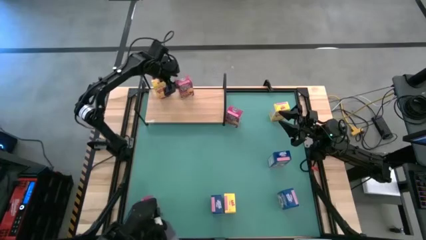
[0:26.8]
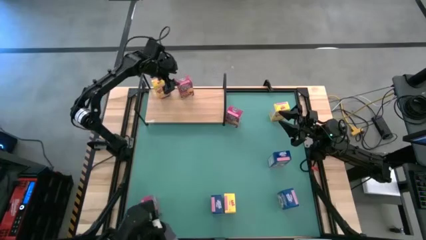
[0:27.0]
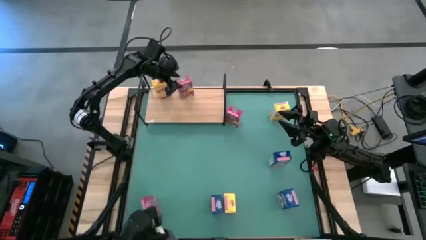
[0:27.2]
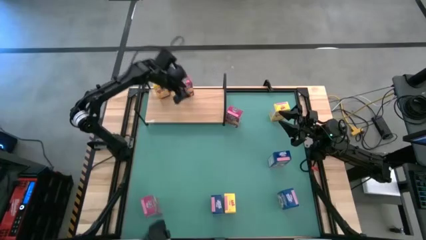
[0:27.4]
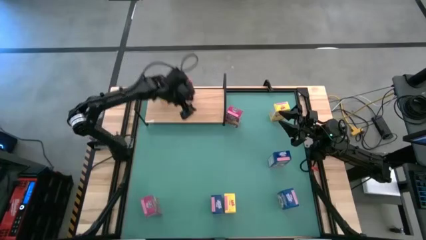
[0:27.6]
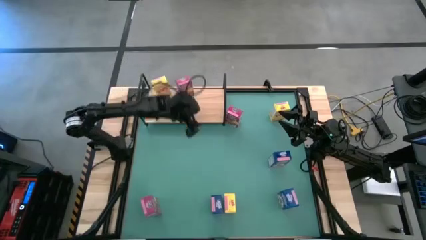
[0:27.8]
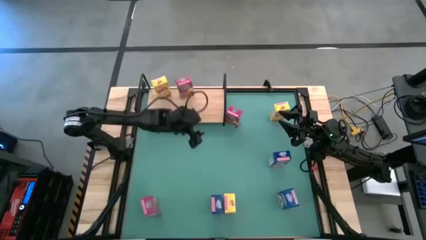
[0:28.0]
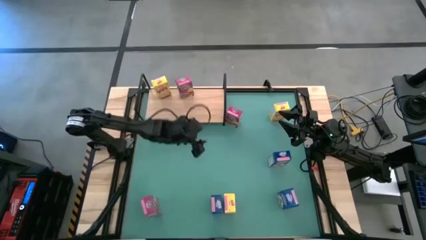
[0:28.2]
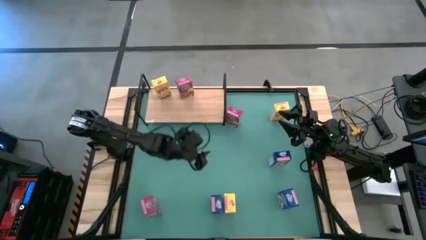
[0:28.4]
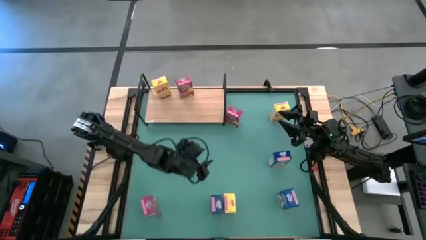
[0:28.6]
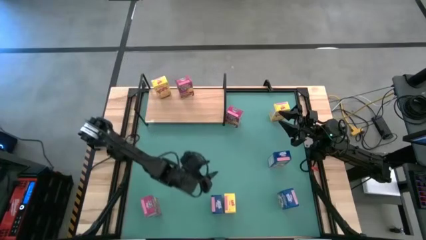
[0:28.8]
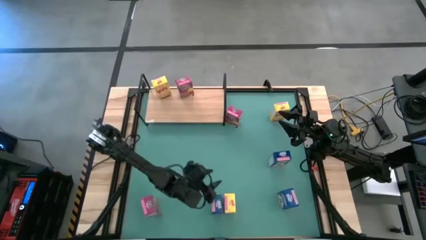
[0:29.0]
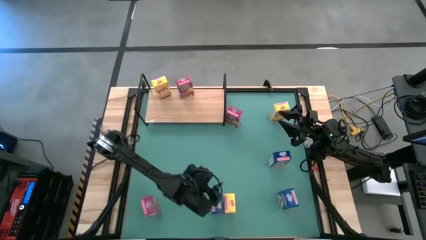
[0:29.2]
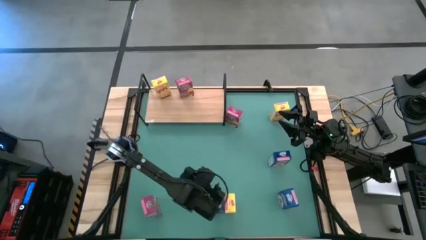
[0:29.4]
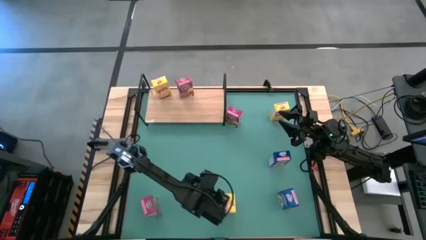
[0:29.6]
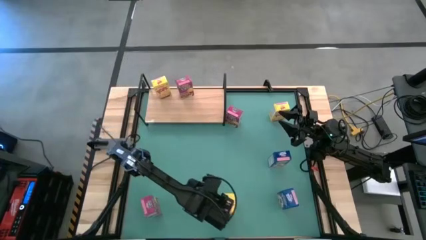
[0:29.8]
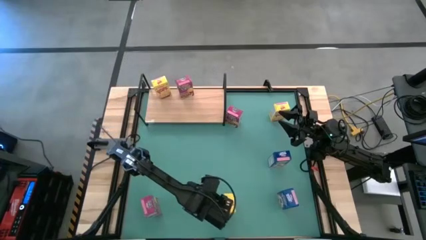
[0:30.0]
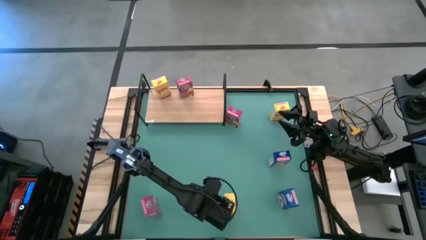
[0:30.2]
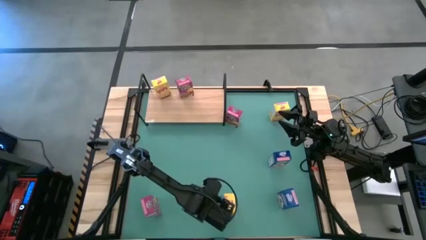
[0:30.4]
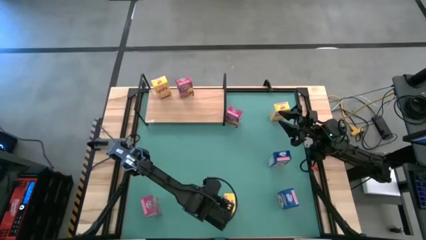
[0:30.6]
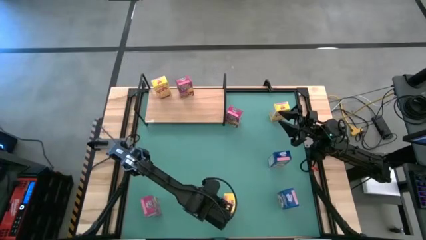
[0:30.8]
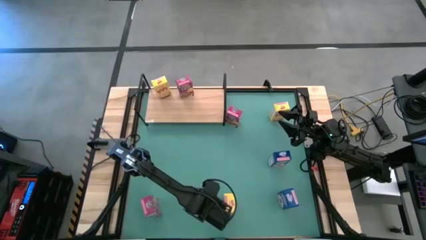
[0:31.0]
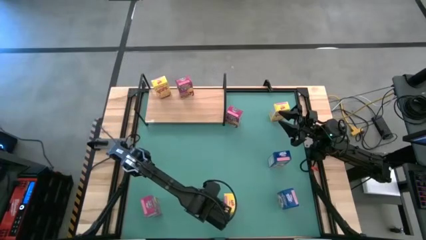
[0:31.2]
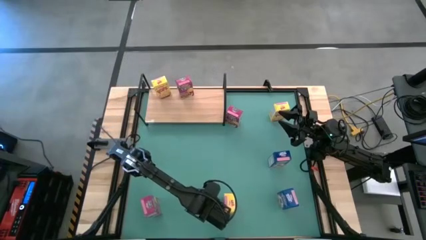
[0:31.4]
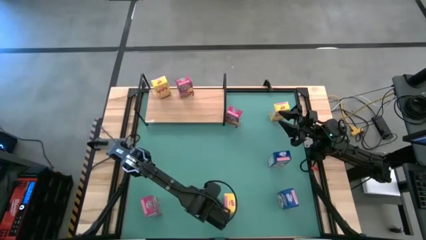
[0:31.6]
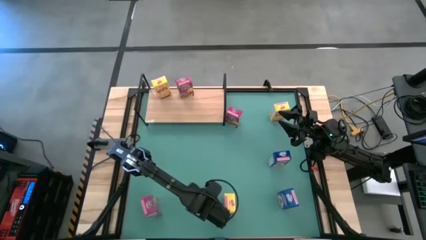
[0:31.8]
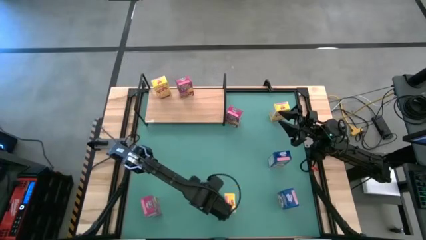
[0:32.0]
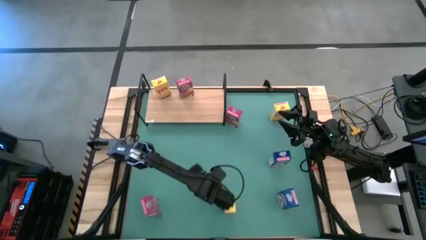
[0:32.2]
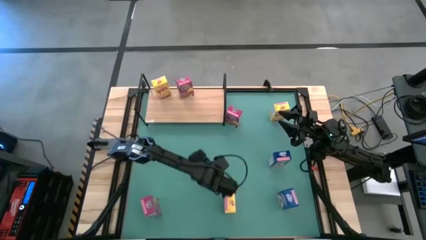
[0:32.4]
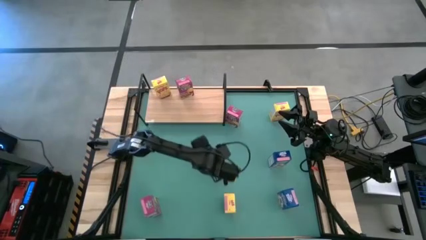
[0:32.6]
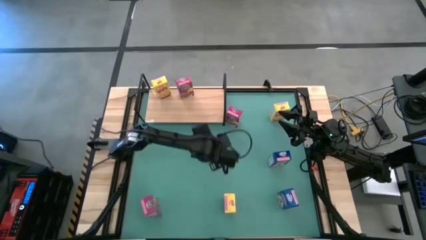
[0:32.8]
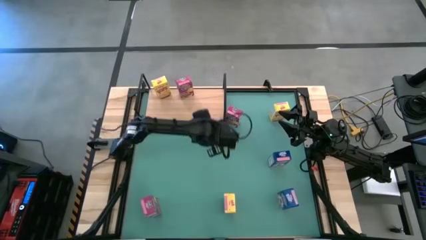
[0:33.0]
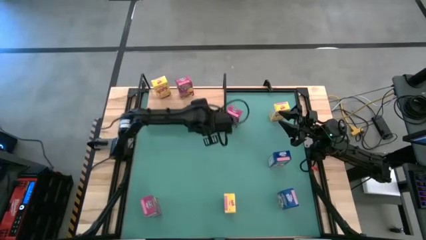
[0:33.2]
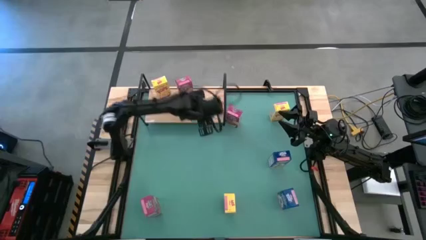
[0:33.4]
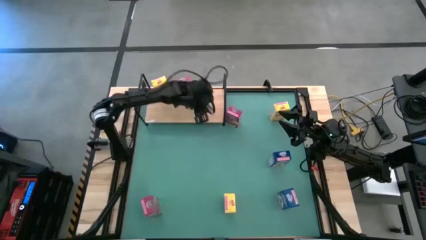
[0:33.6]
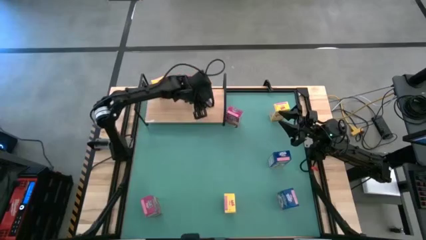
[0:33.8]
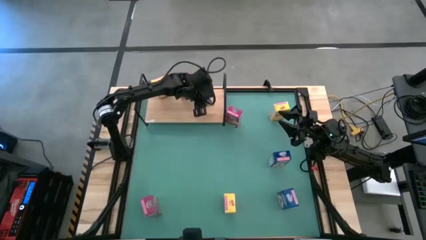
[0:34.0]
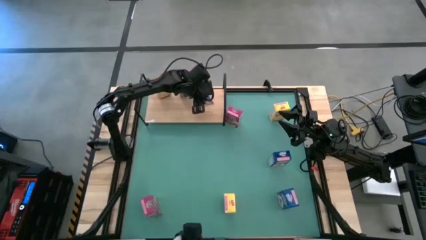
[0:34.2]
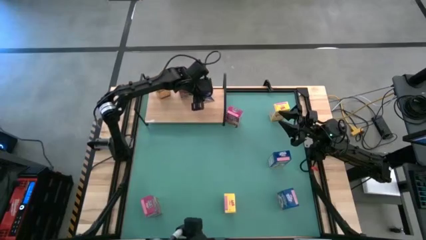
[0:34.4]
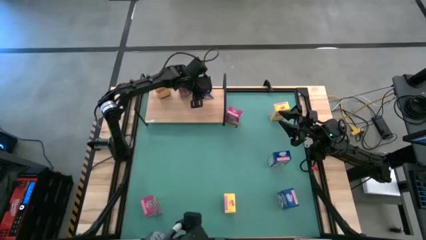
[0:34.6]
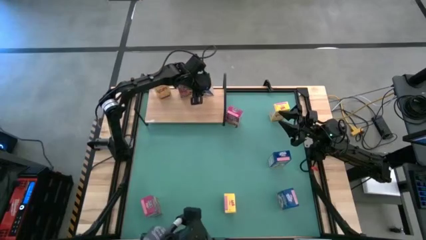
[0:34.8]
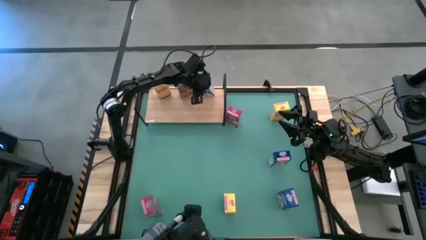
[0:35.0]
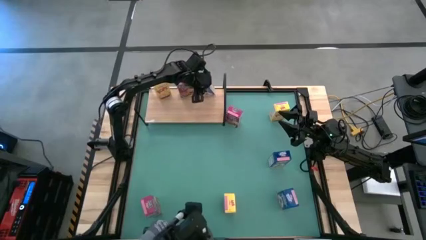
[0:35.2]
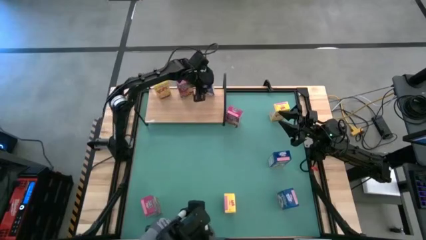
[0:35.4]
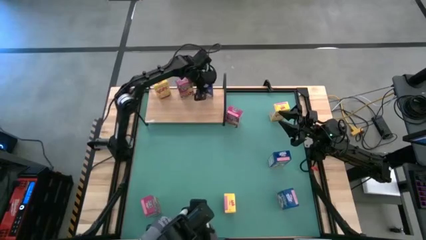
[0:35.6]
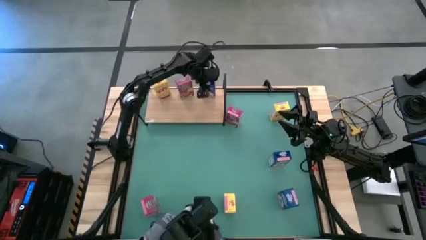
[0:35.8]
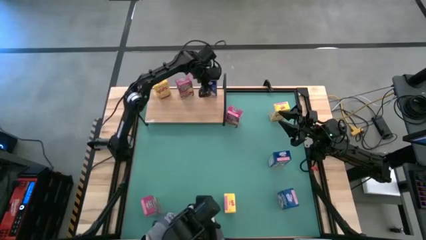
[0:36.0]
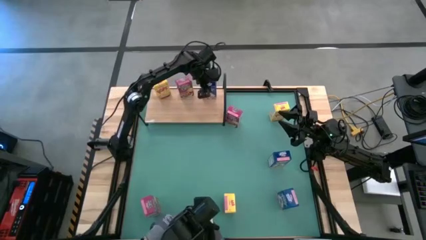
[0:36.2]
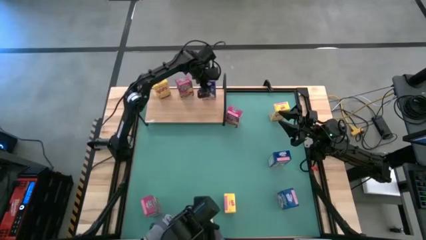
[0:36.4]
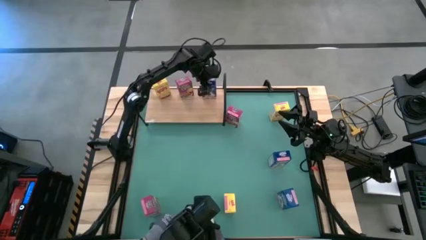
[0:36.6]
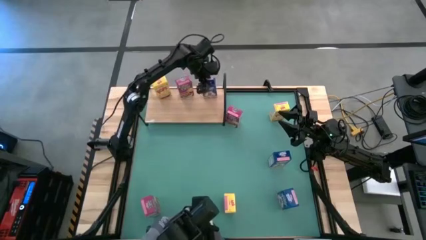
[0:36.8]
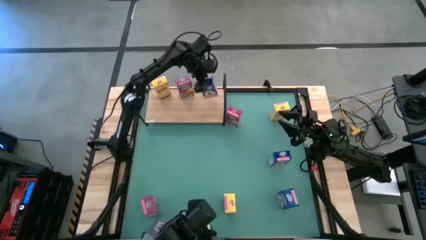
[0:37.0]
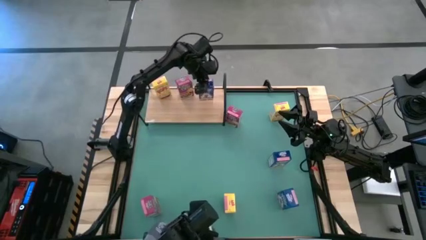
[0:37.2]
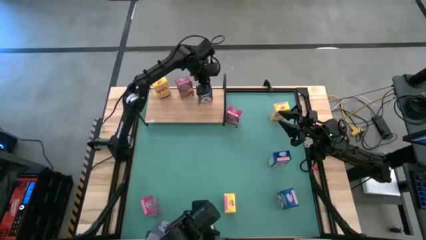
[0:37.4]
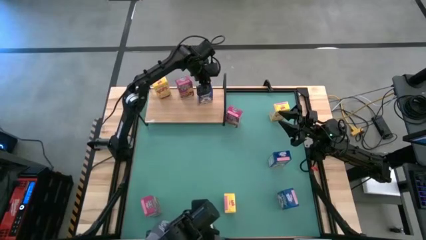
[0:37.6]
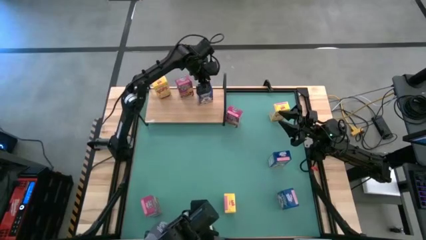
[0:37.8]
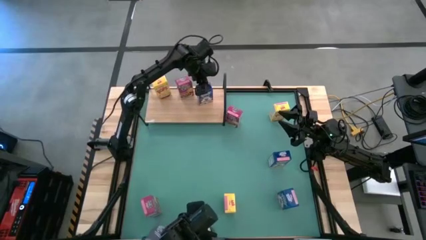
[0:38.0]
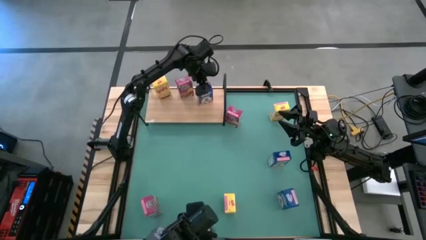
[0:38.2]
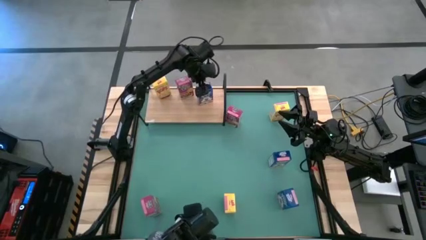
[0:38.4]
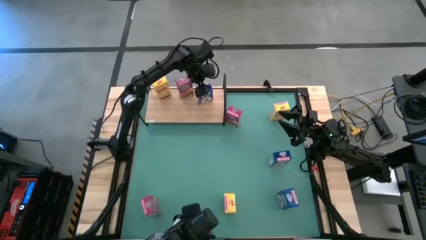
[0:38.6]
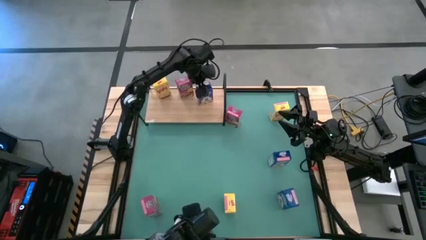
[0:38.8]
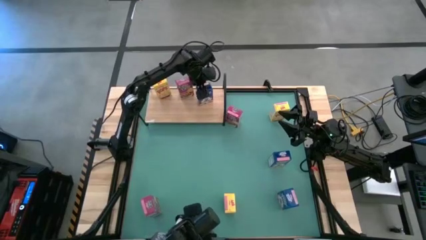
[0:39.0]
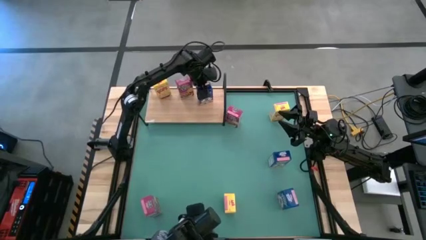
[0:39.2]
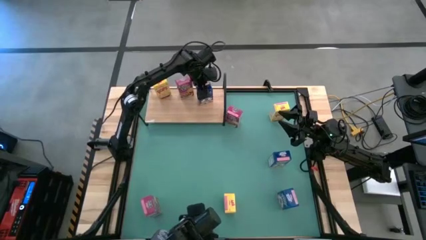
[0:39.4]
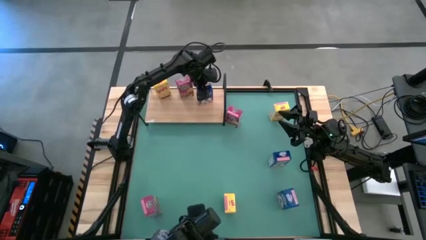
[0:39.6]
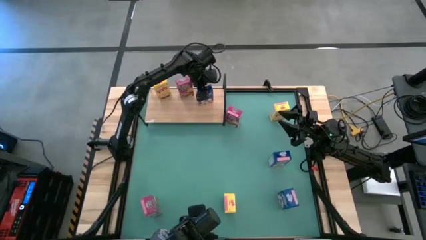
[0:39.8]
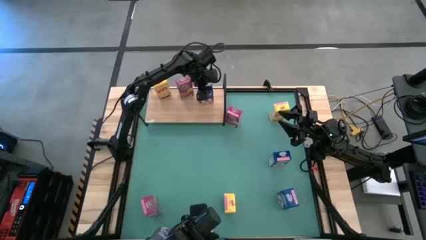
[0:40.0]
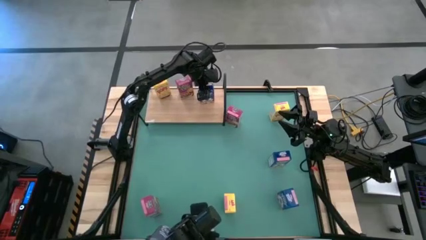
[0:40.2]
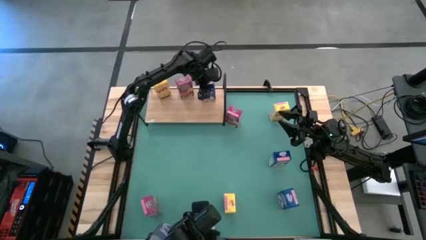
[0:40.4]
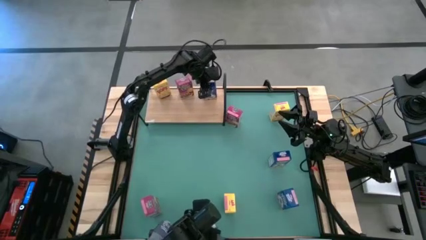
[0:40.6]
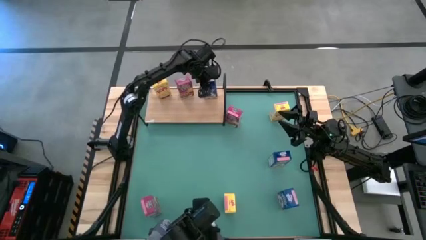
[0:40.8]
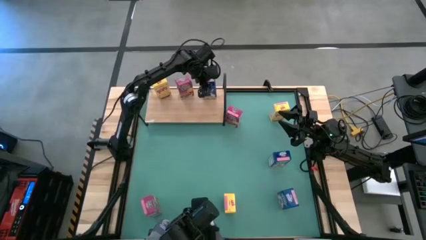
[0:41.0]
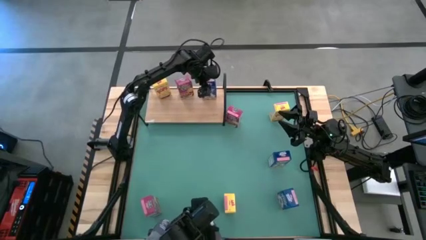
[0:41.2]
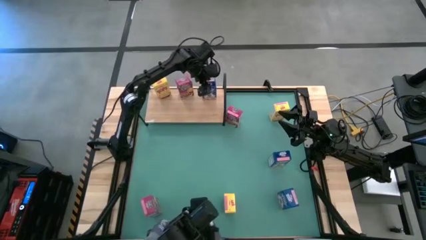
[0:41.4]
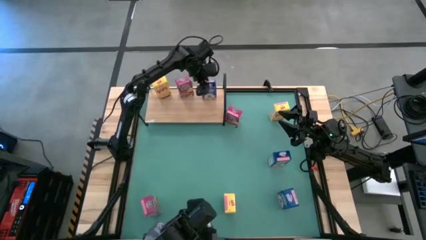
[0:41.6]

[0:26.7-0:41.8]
Task: Stack cereal on shelf
Put the bottom left blue cereal box on the shelf

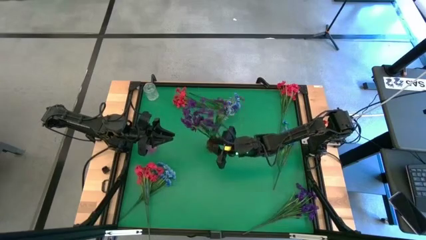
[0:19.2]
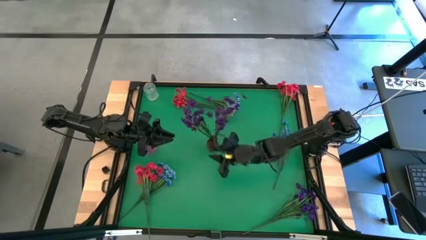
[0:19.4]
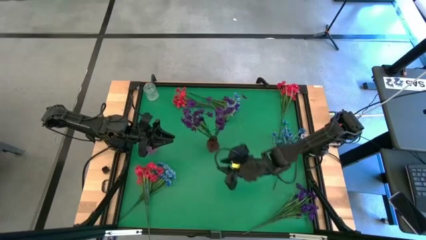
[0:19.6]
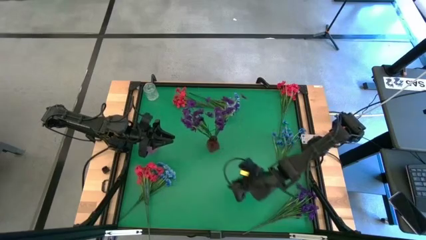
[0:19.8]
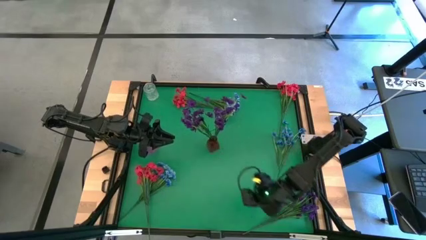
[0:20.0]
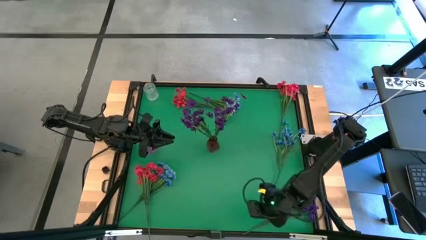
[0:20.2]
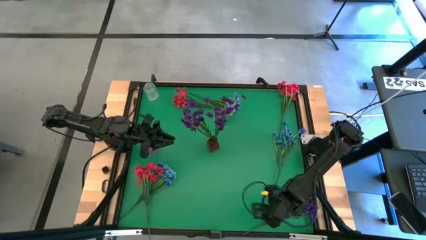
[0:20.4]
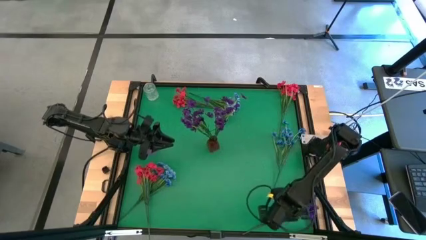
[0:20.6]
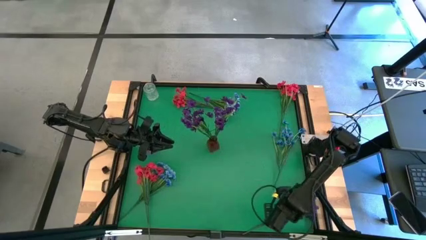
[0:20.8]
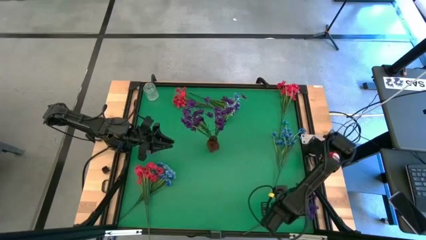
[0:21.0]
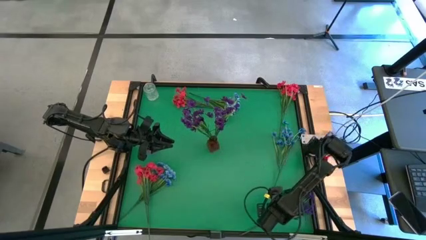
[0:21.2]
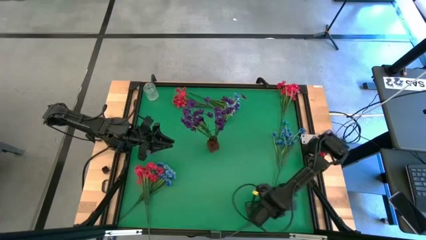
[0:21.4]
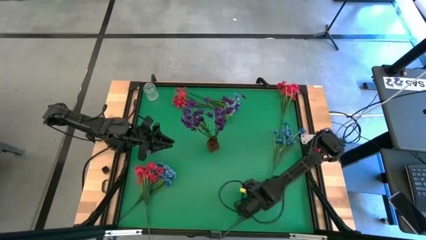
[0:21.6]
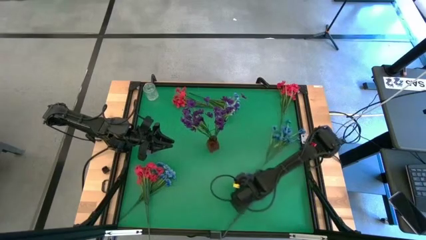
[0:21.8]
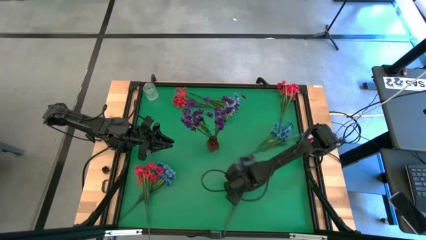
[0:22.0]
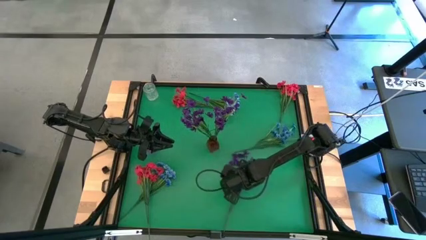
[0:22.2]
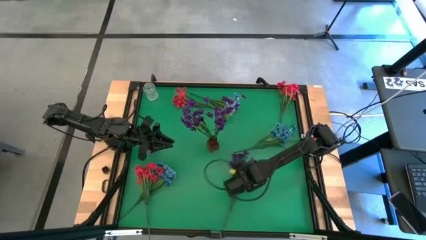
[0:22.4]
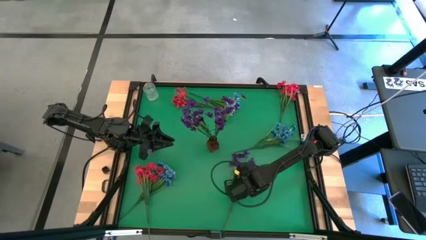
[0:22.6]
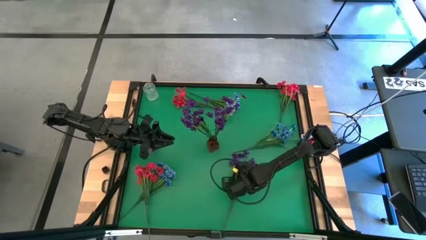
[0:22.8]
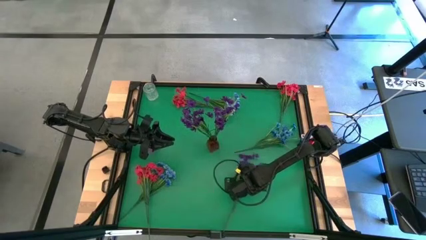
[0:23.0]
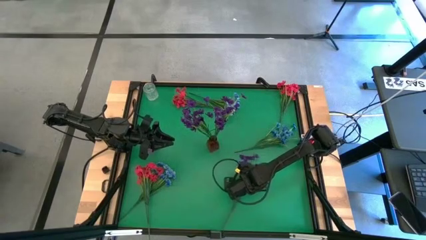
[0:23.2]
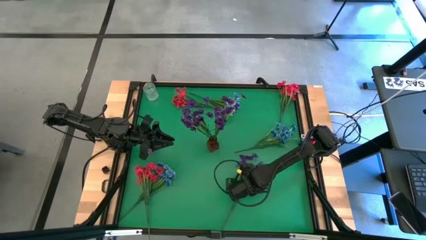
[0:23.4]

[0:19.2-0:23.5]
Task: Sort flowers into vase by color
Put the violet flowers into the red vase
